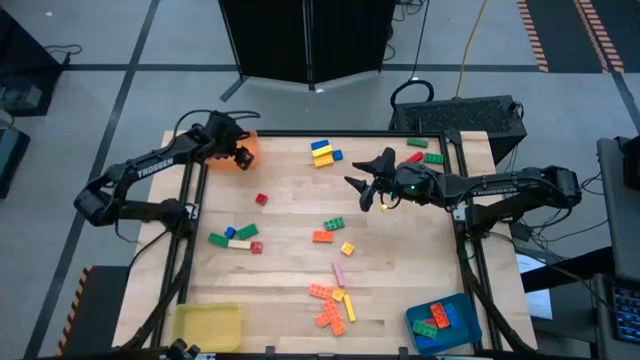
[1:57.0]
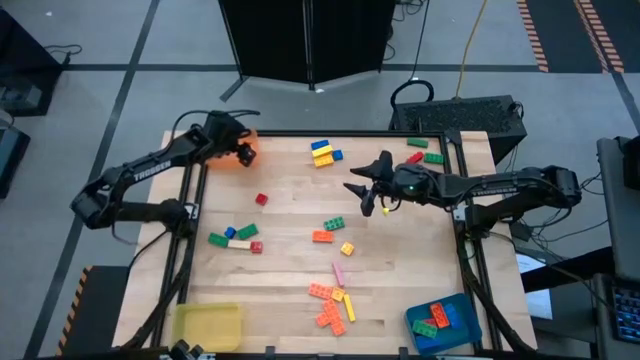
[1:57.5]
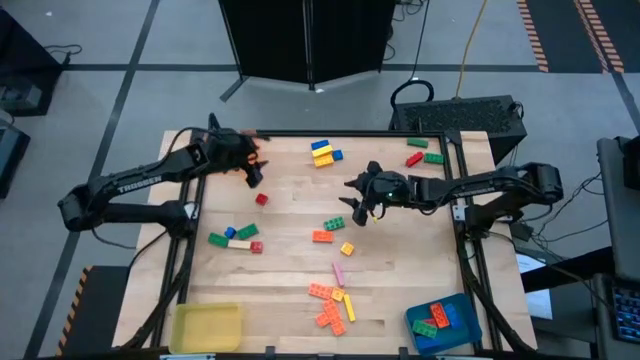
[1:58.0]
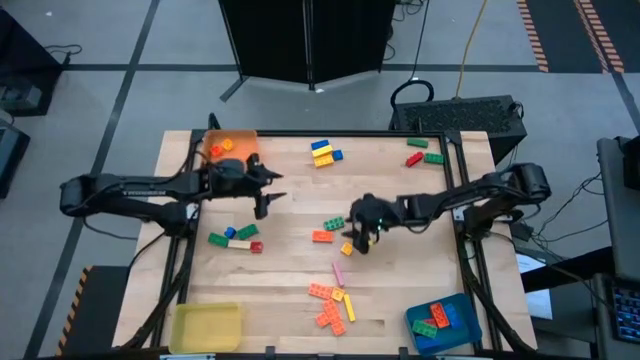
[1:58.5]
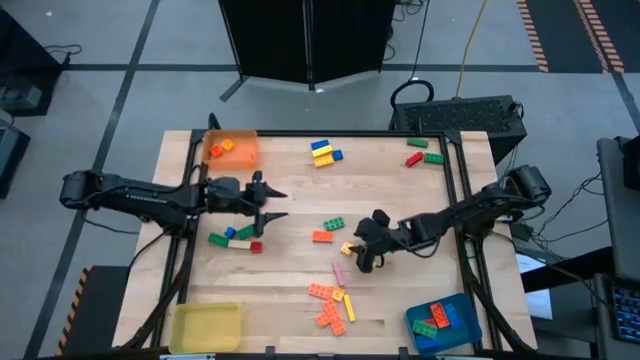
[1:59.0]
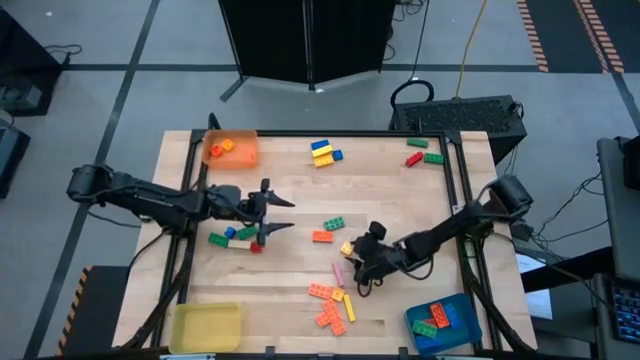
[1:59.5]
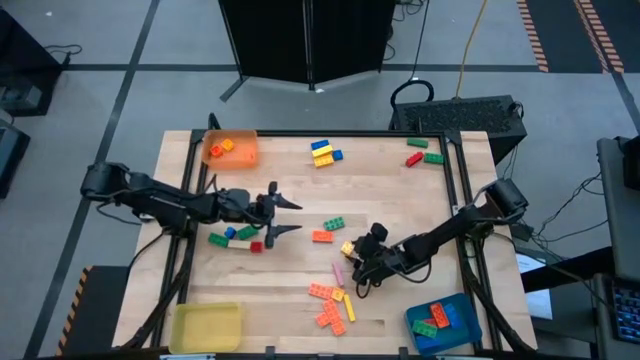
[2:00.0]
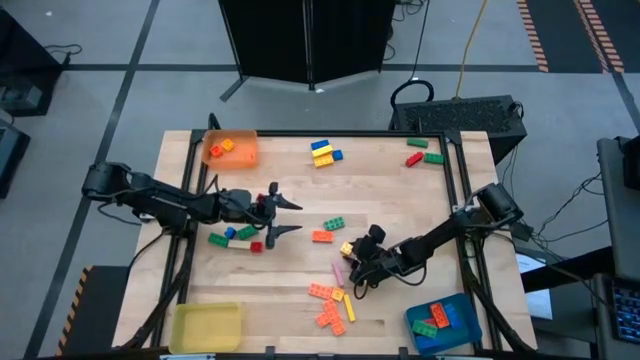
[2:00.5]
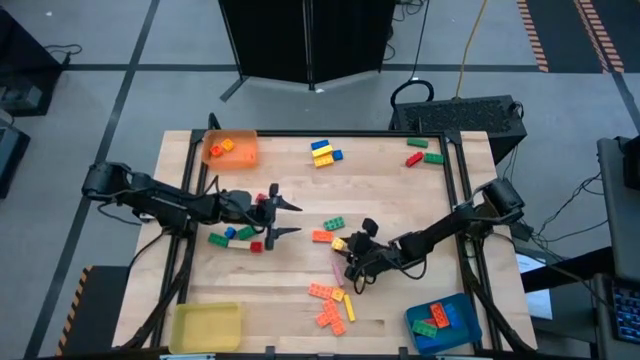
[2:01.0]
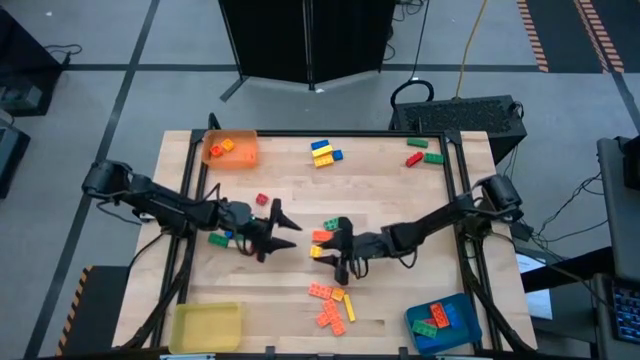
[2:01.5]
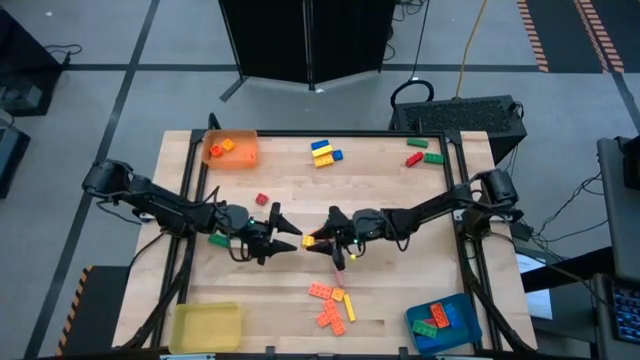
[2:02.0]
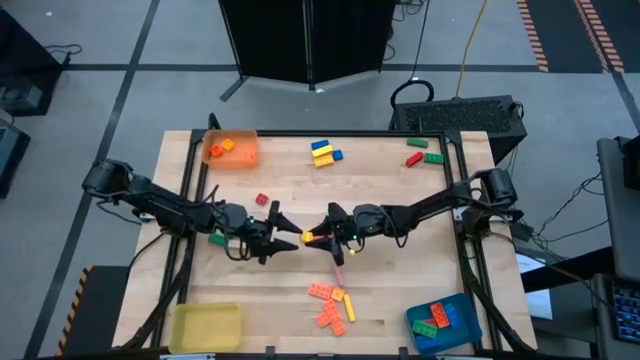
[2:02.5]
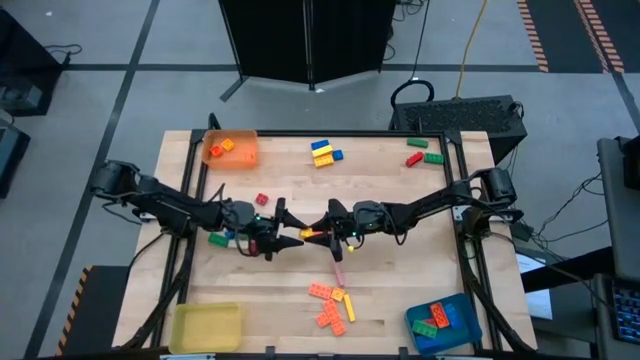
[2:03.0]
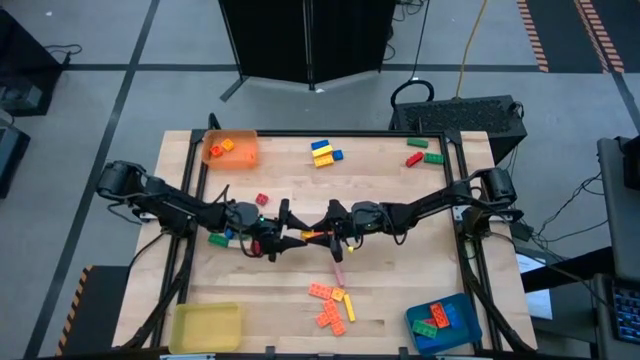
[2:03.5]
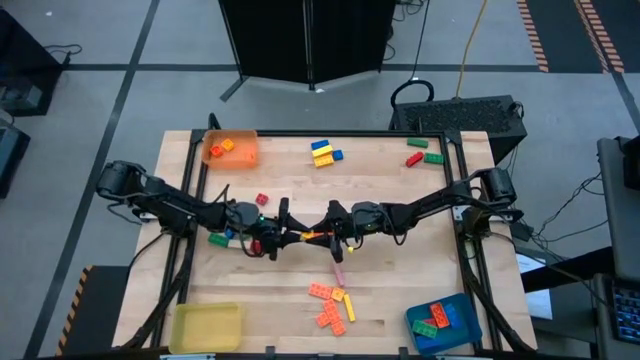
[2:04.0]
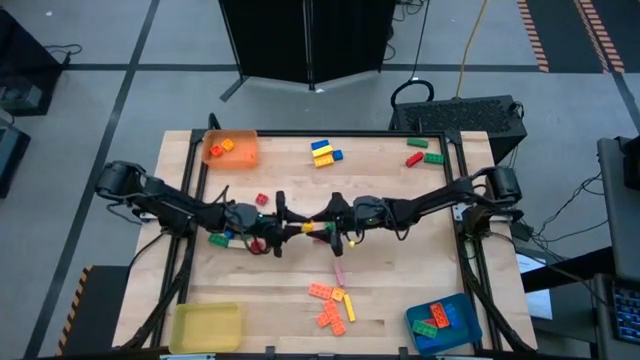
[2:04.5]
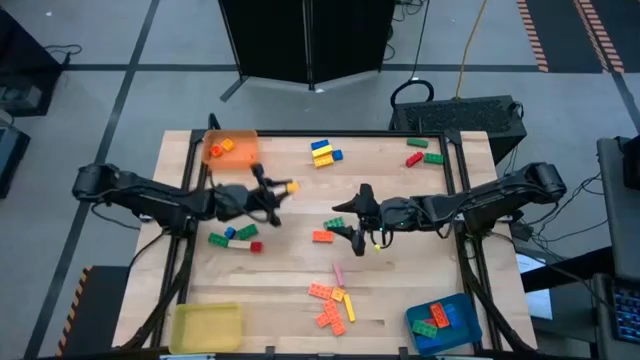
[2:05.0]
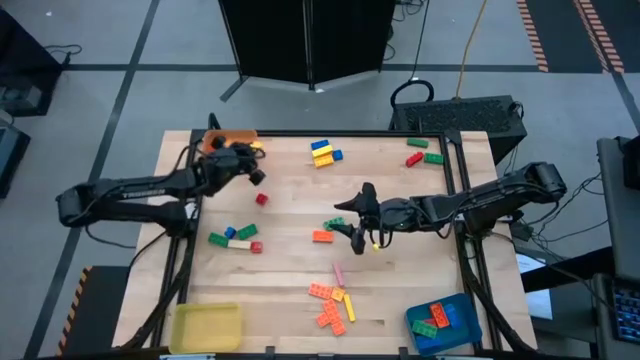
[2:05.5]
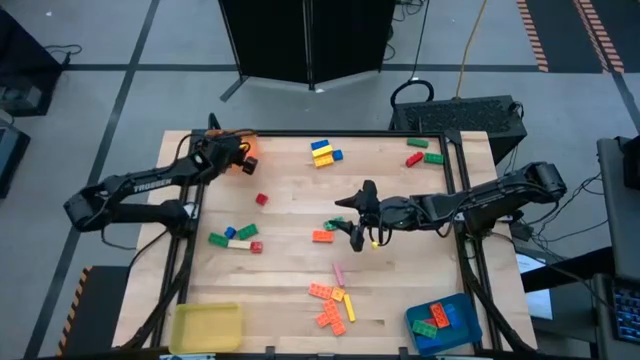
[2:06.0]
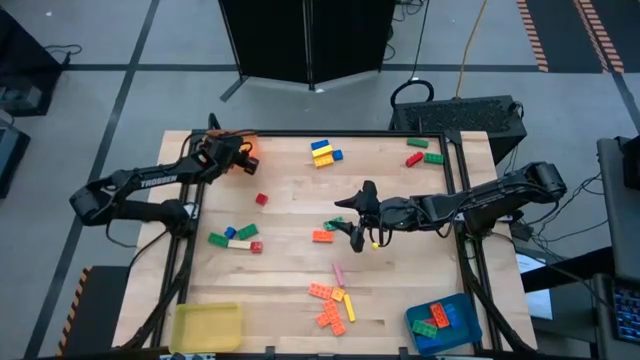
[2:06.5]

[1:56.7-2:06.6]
Task: Sort blocks by size
Put the yellow 4 stud game piece into the orange bin

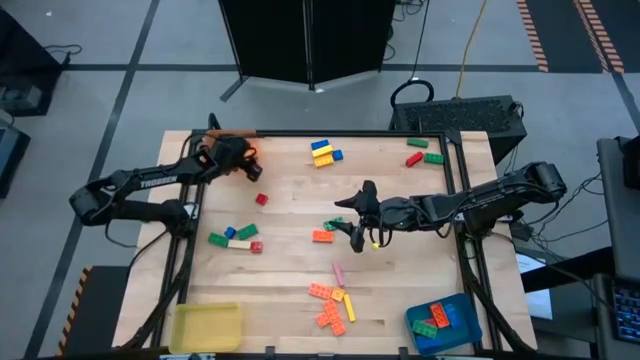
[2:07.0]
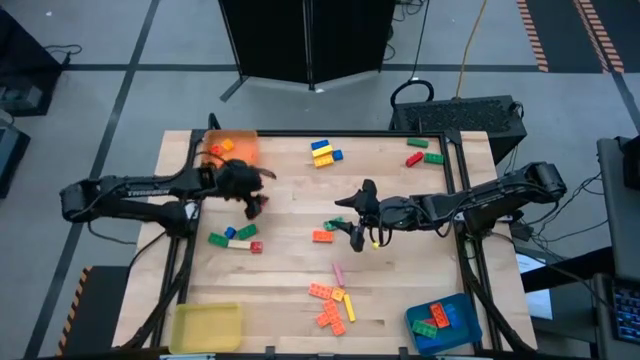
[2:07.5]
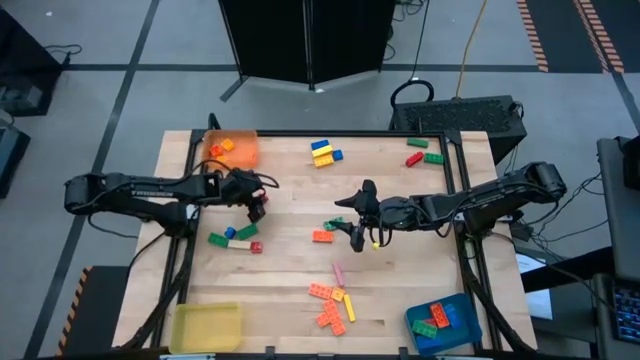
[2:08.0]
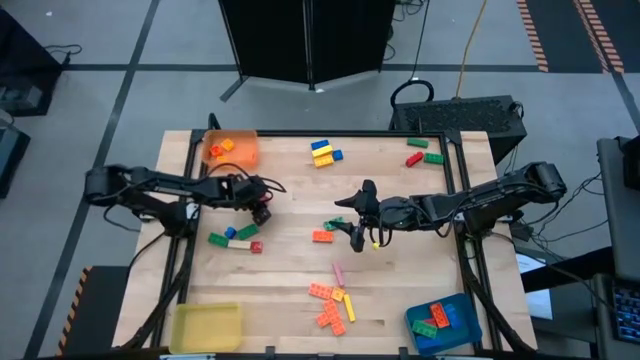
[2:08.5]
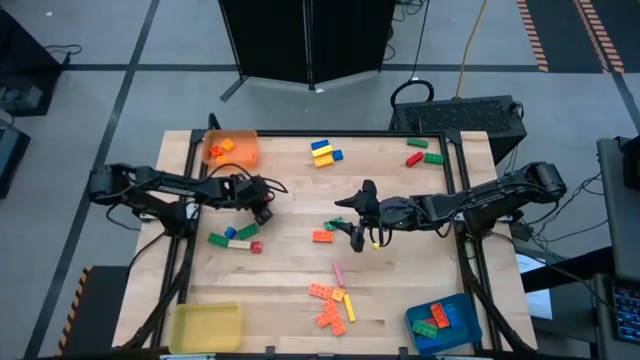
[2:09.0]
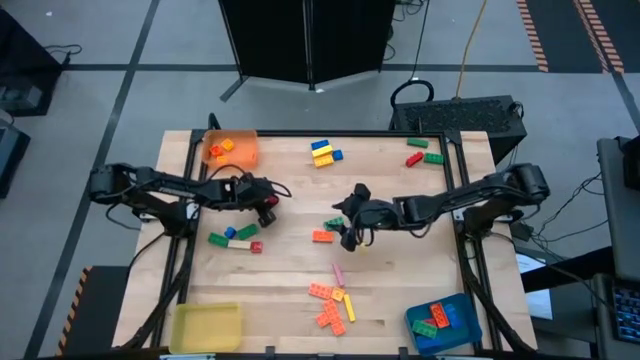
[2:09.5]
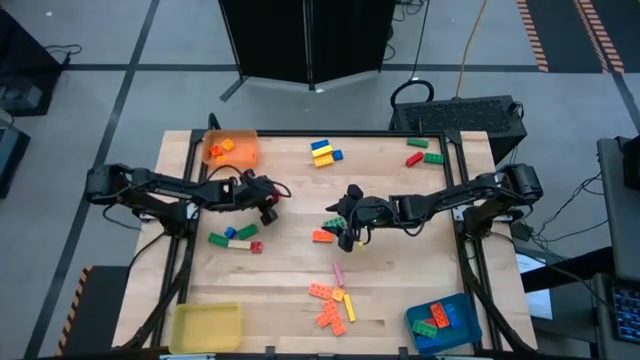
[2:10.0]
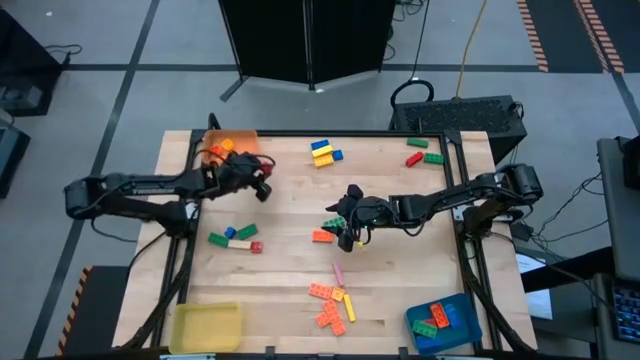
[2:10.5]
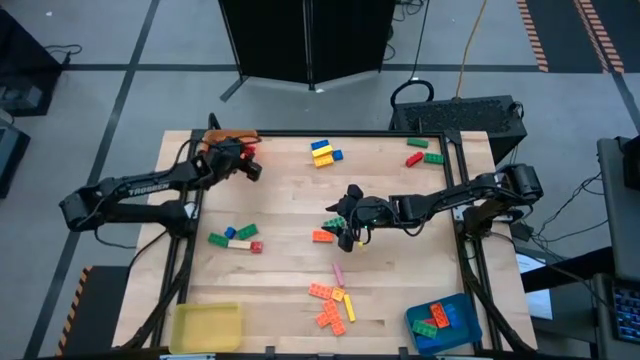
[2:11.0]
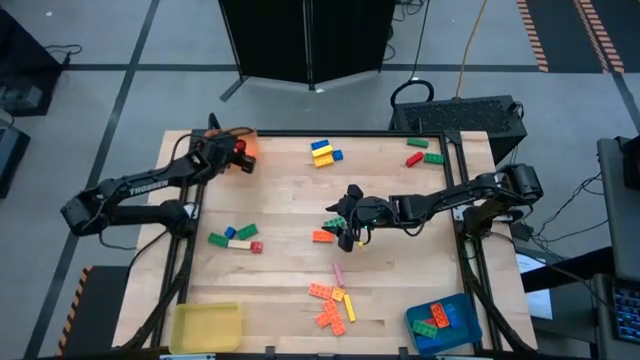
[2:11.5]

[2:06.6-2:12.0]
Put the red 4 stud game piece into the orange bin

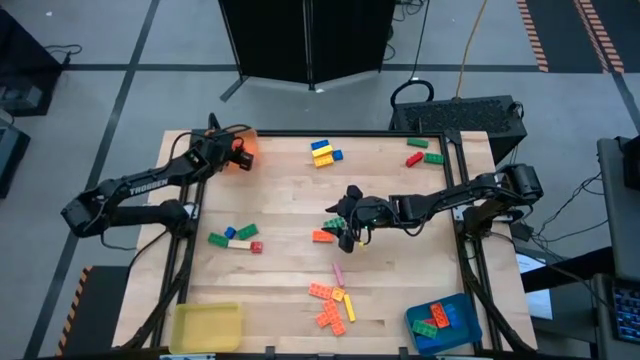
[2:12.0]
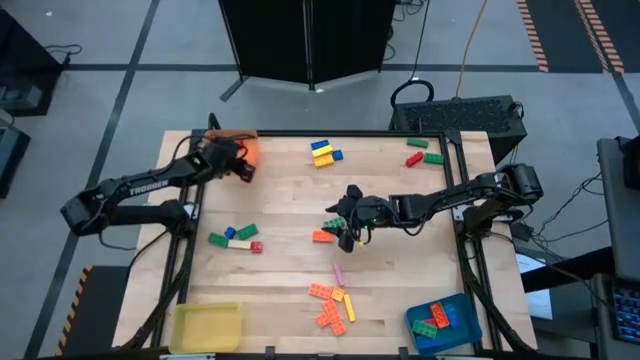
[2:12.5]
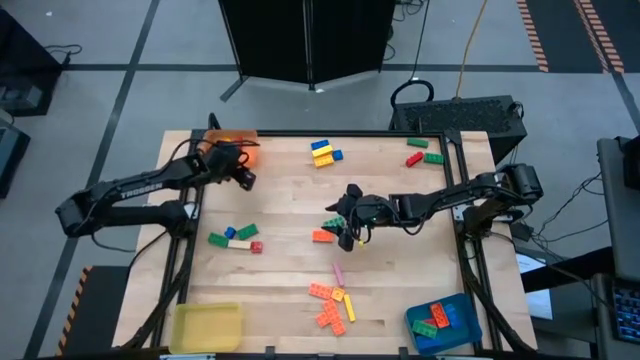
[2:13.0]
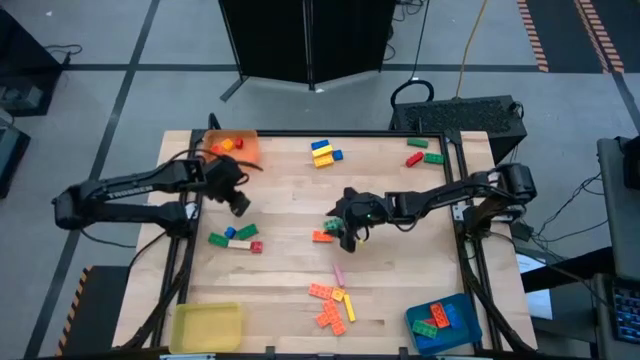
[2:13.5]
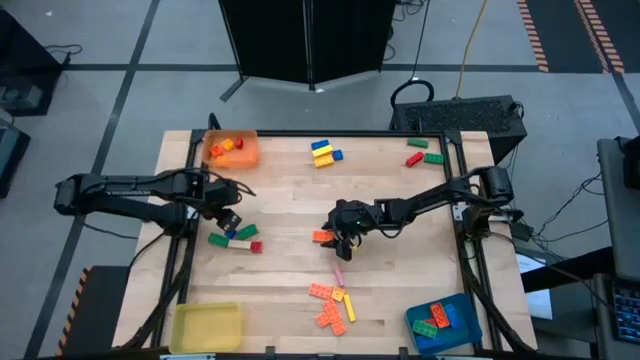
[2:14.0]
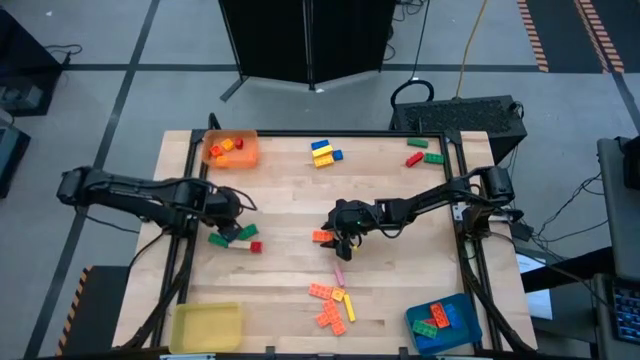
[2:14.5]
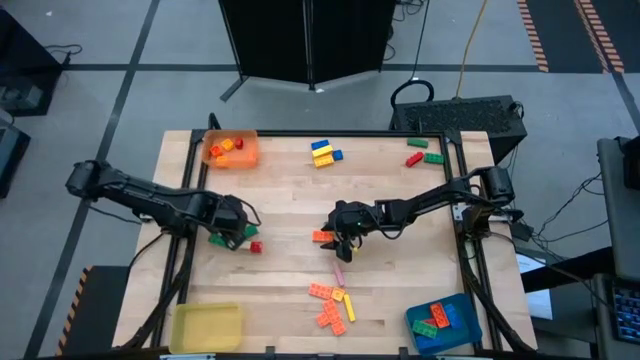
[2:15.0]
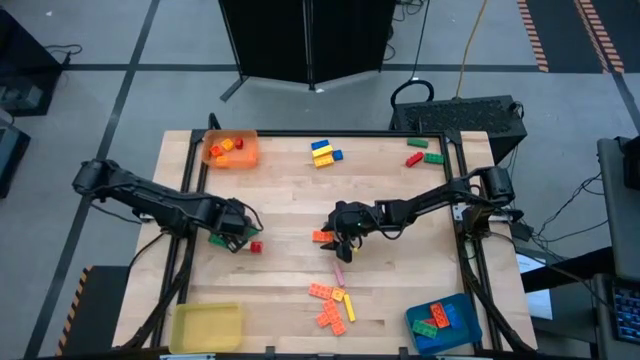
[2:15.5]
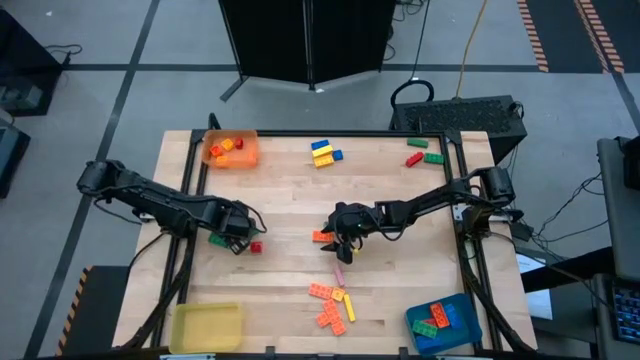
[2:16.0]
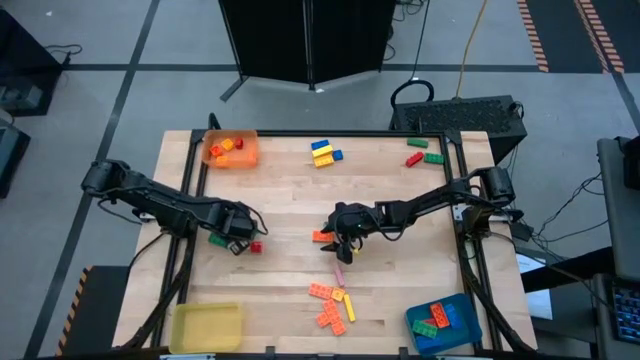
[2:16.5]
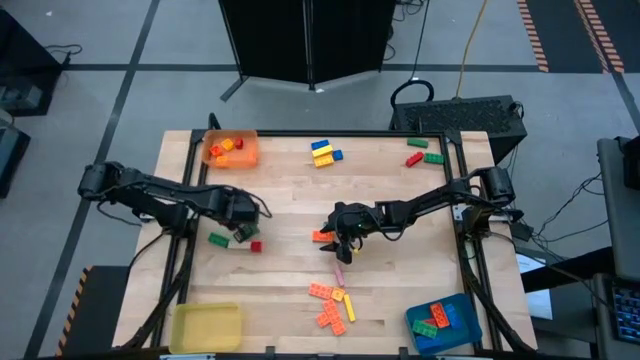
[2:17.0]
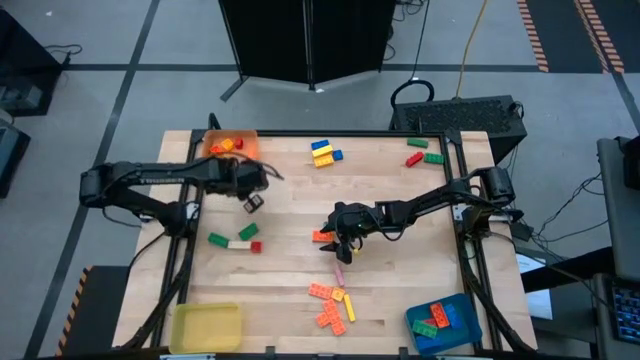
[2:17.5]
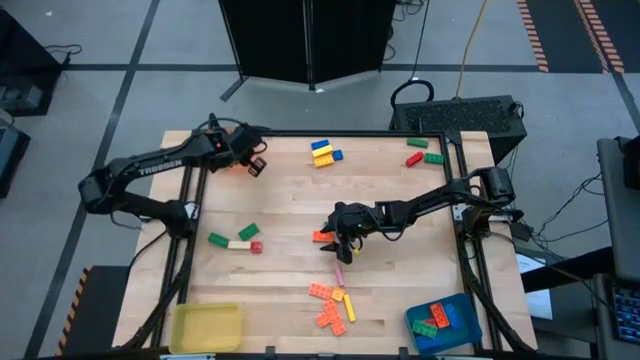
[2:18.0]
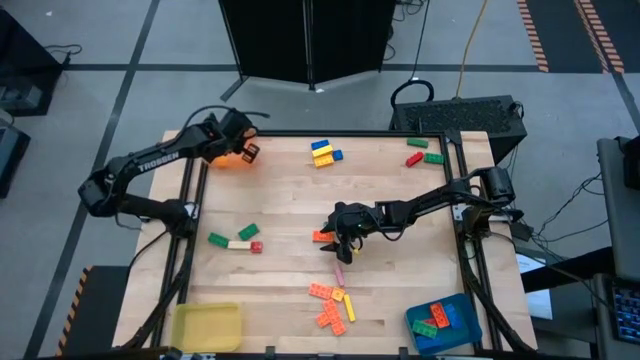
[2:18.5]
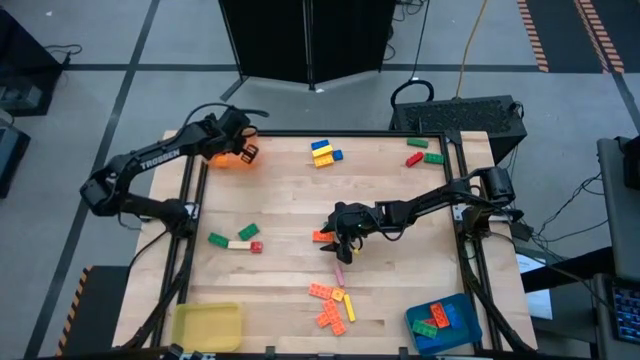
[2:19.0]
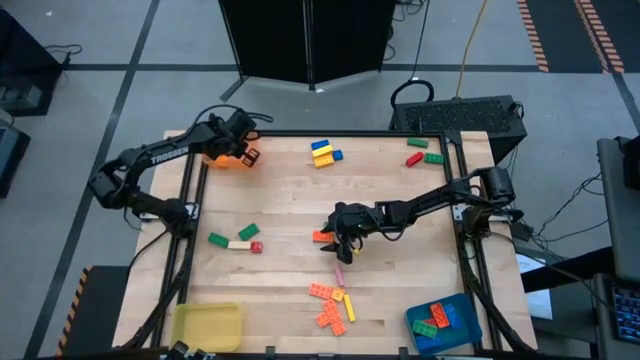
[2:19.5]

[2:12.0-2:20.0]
Put the blue 4 stud game piece into the orange bin
